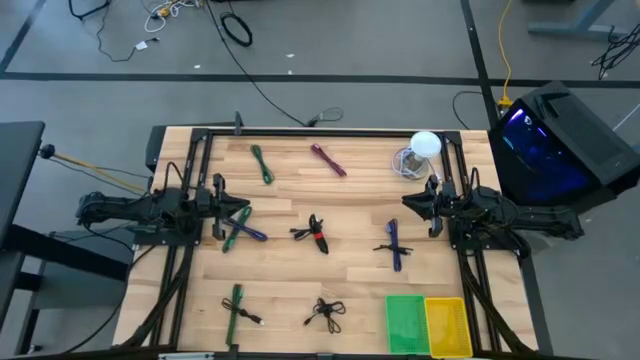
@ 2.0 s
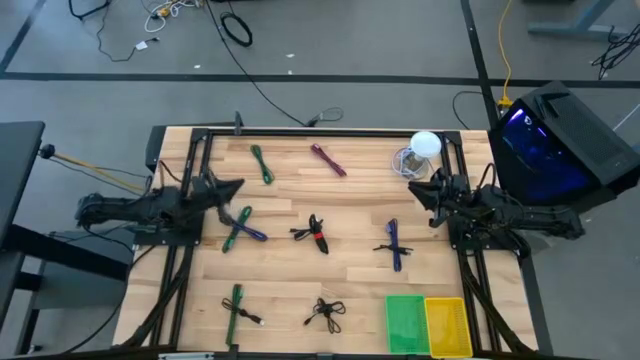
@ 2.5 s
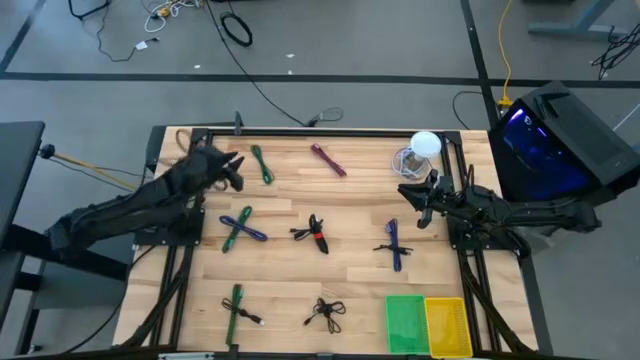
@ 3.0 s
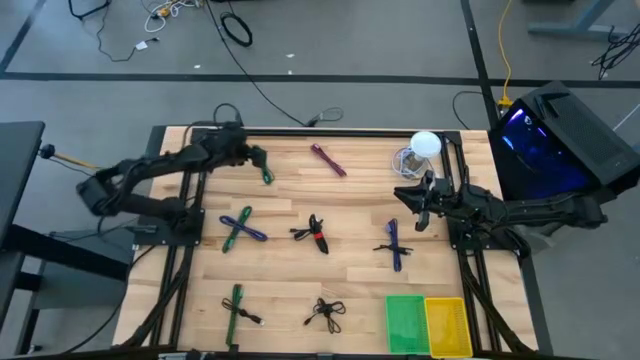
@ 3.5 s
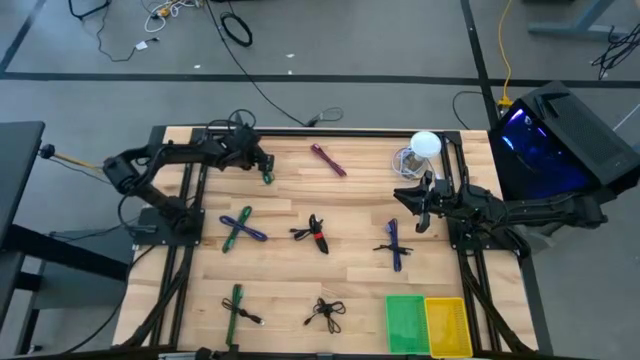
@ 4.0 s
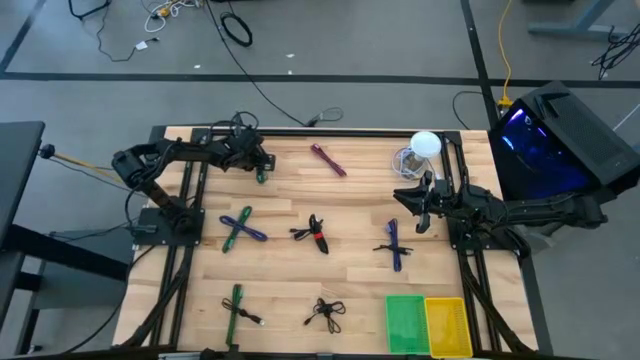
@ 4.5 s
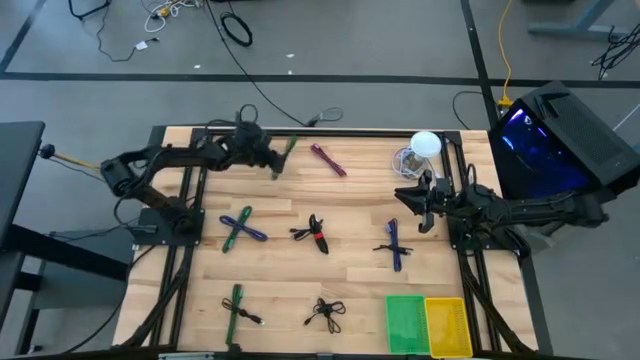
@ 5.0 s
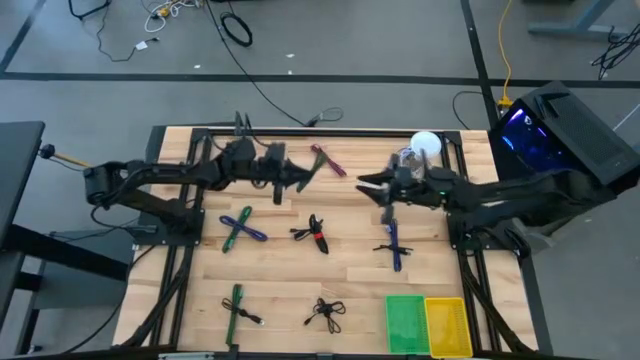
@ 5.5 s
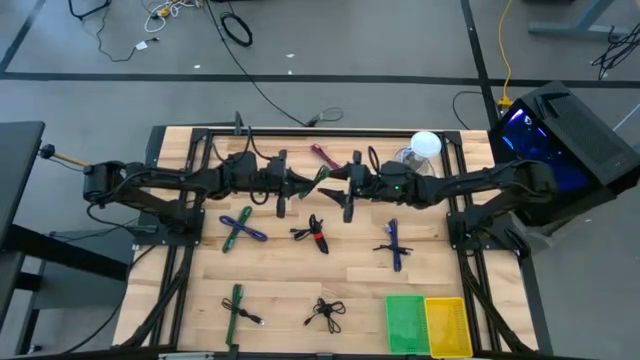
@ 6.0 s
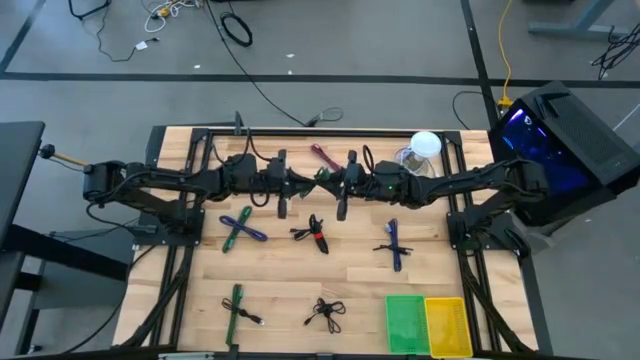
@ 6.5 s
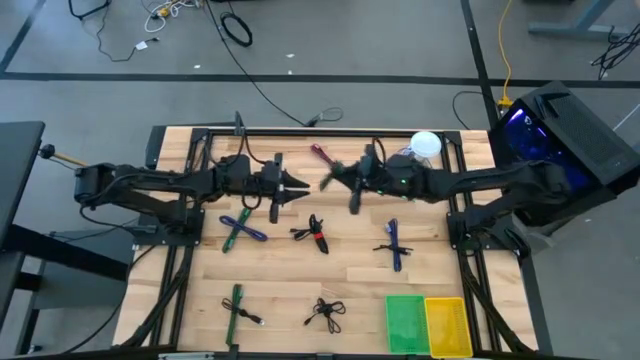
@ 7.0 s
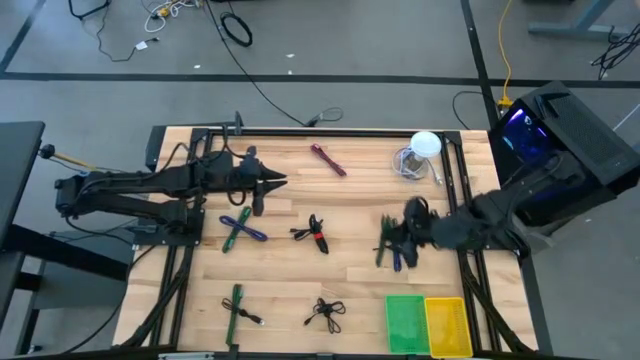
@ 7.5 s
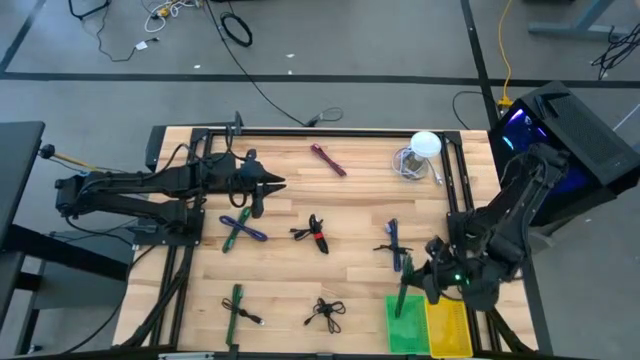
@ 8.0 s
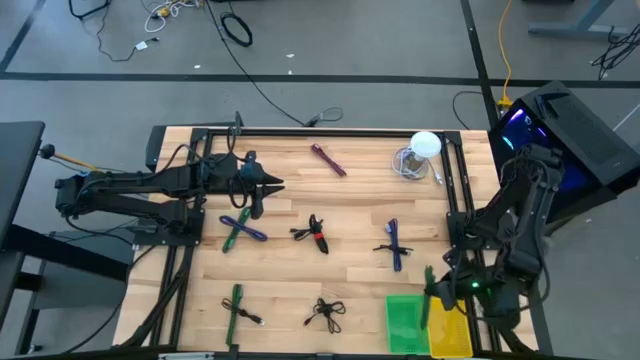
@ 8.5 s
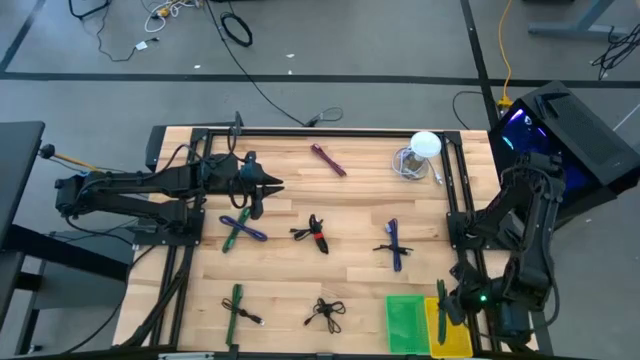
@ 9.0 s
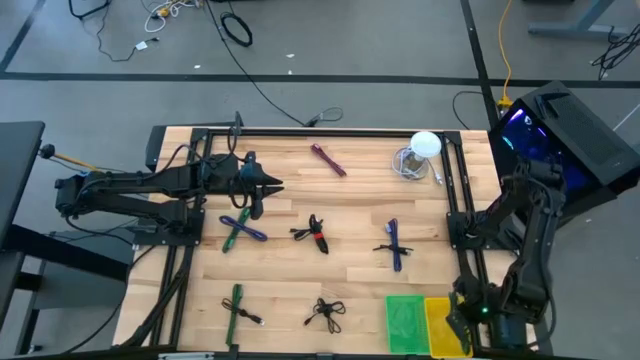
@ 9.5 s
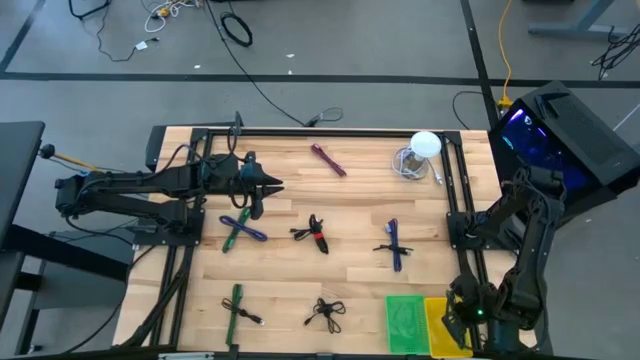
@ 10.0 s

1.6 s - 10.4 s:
Task: Pick & Place USB Port
Put the green and black charger cable into the yellow basket

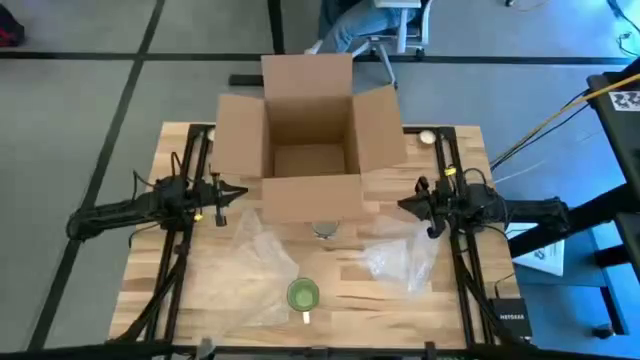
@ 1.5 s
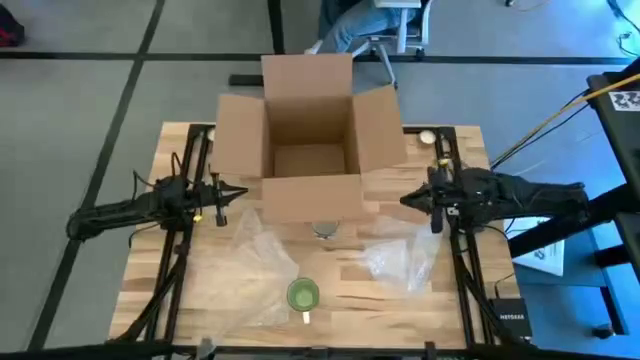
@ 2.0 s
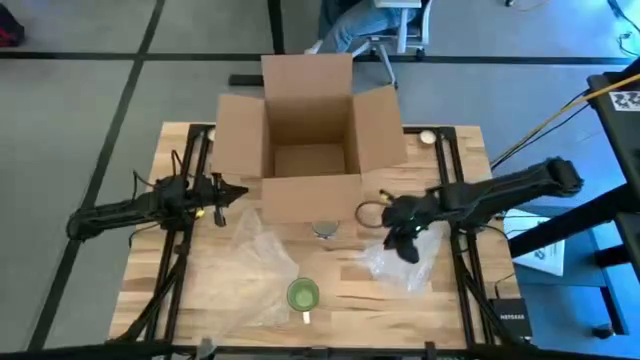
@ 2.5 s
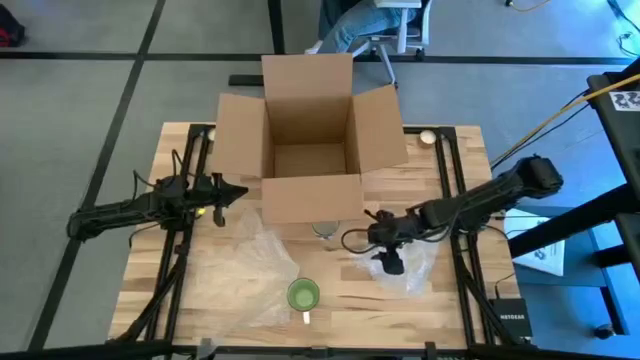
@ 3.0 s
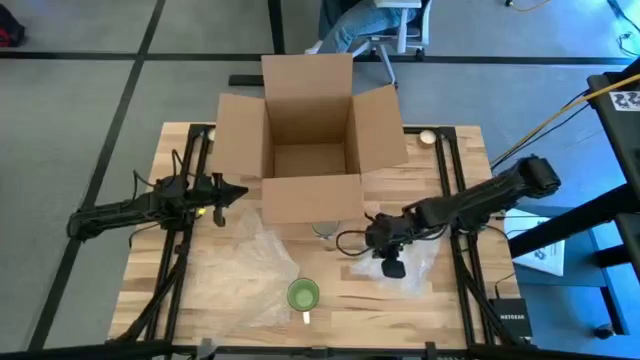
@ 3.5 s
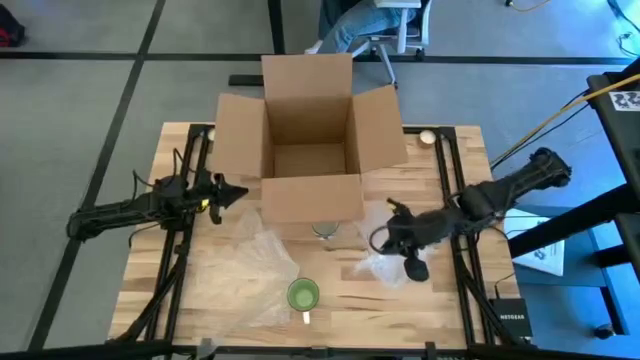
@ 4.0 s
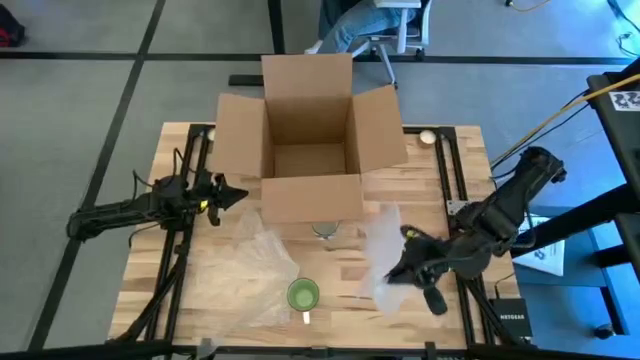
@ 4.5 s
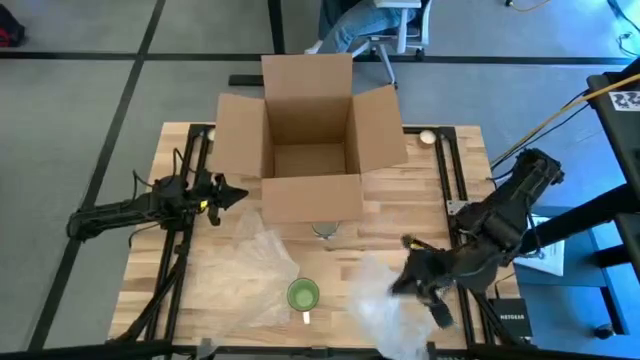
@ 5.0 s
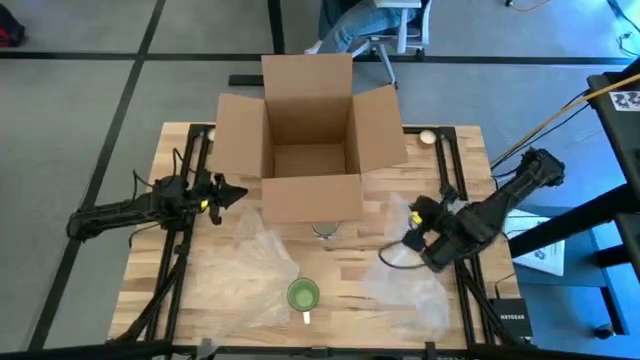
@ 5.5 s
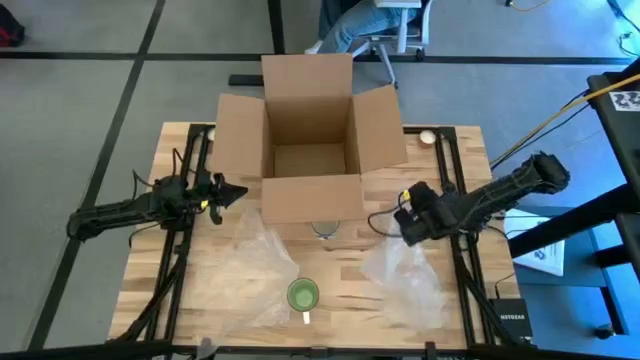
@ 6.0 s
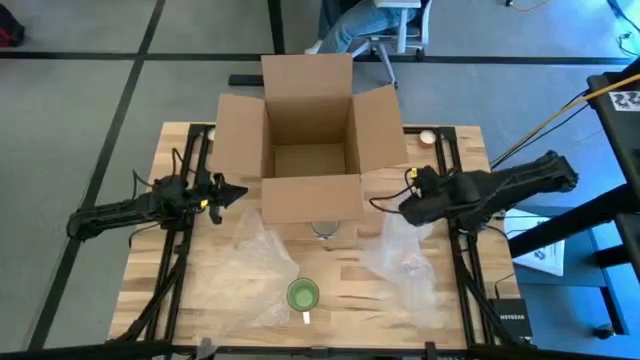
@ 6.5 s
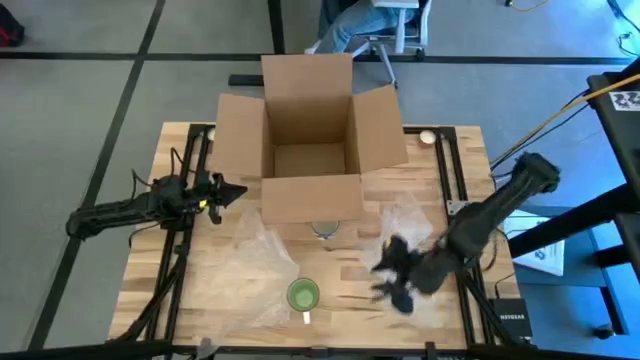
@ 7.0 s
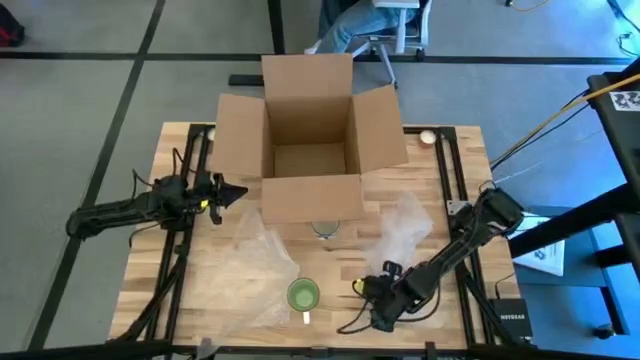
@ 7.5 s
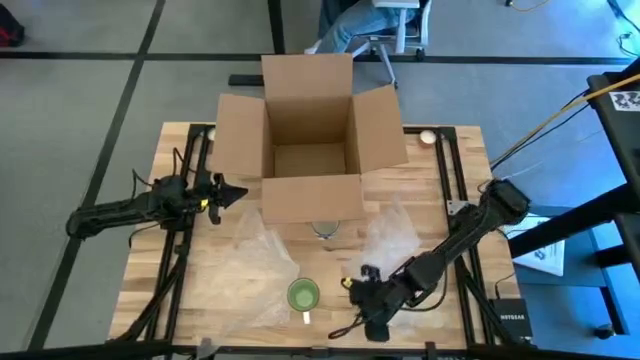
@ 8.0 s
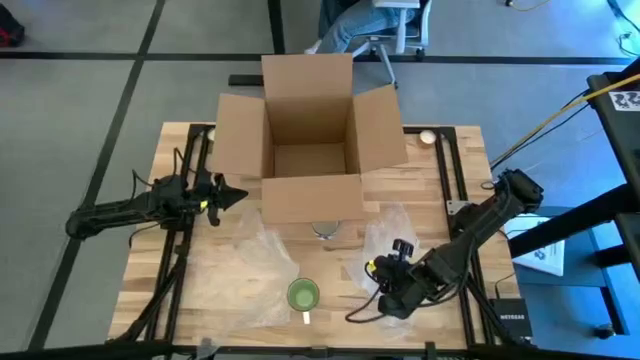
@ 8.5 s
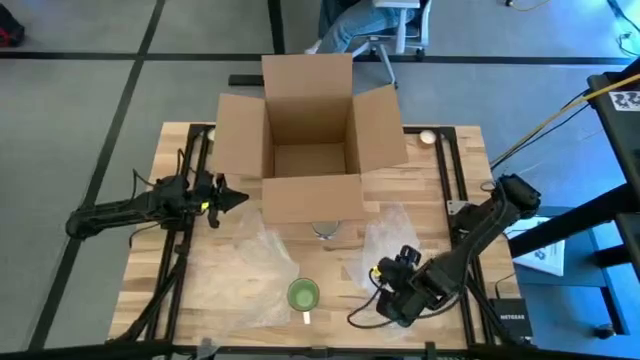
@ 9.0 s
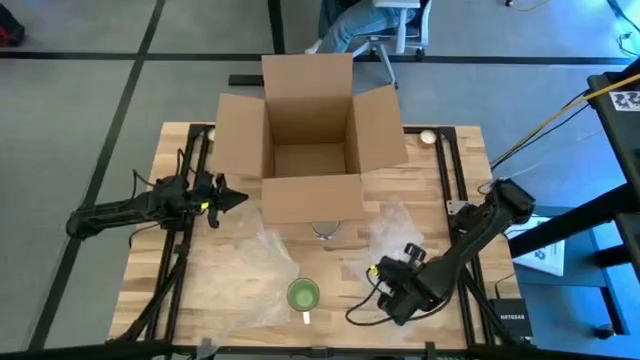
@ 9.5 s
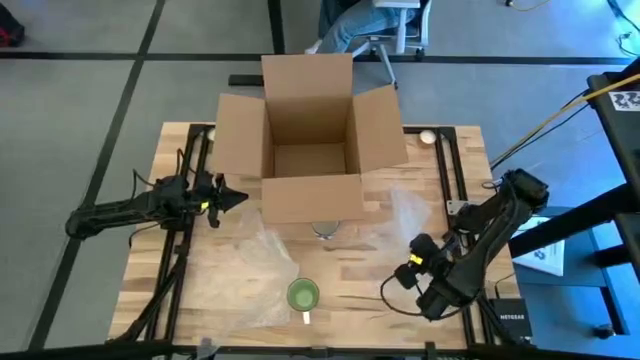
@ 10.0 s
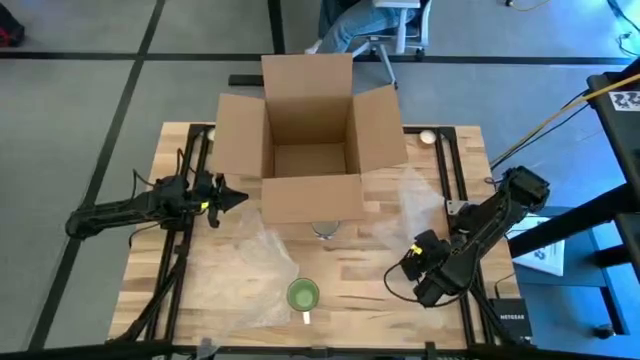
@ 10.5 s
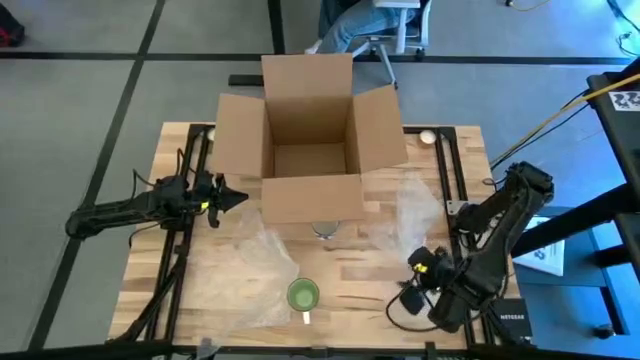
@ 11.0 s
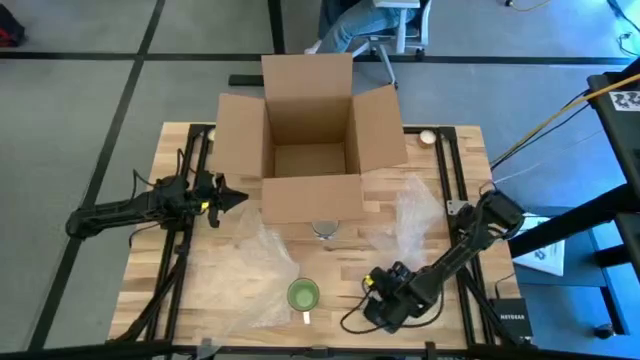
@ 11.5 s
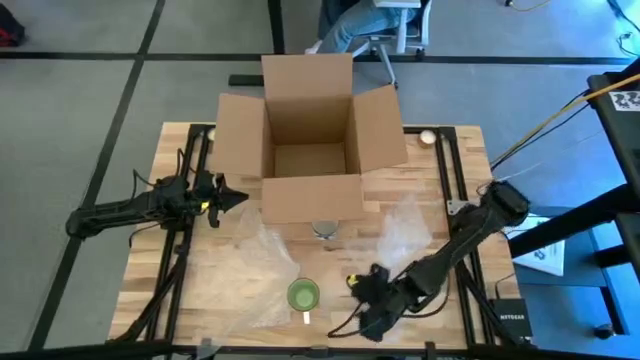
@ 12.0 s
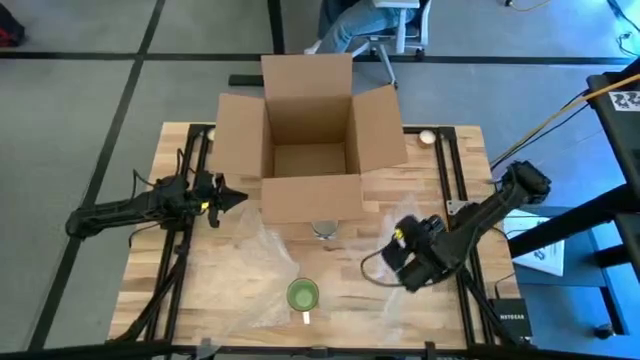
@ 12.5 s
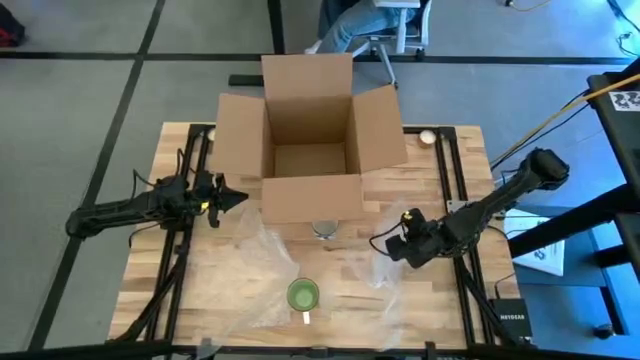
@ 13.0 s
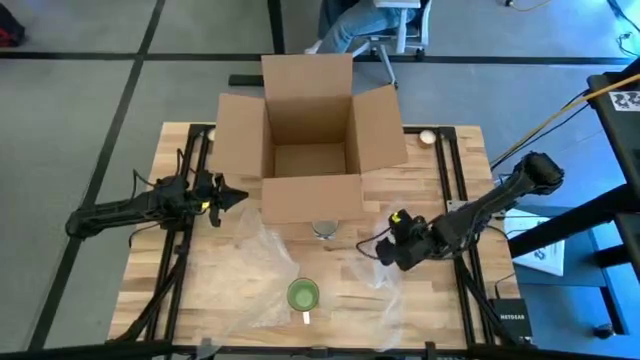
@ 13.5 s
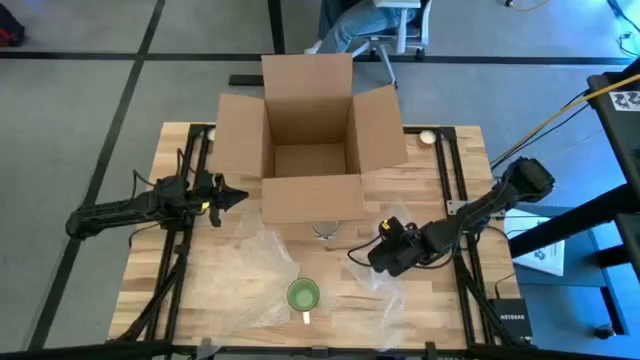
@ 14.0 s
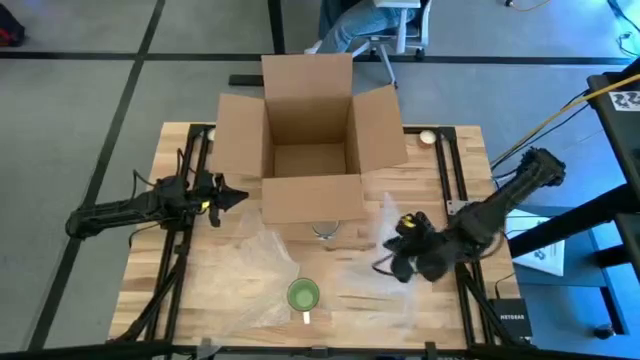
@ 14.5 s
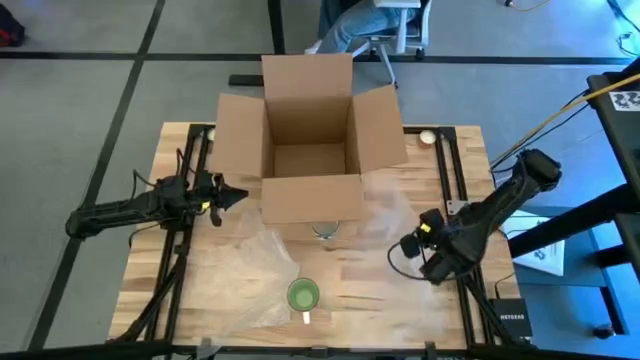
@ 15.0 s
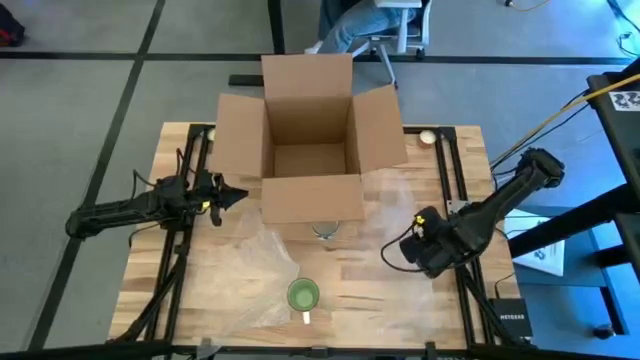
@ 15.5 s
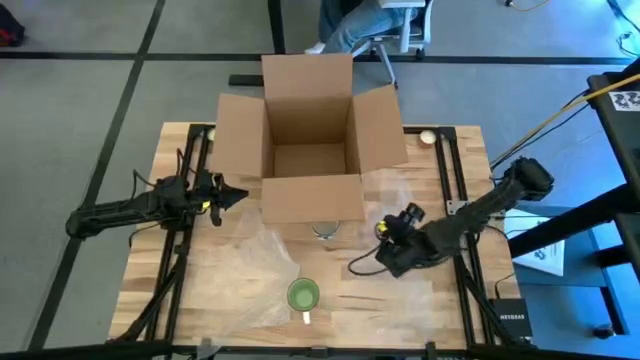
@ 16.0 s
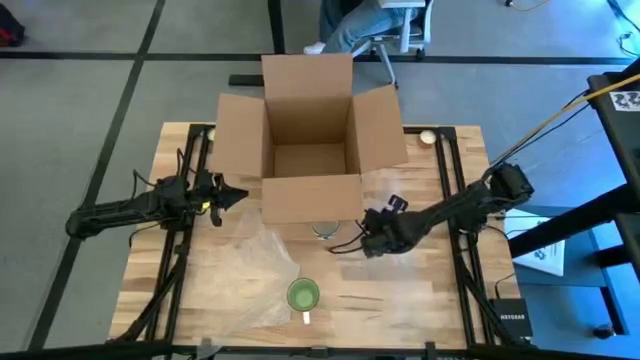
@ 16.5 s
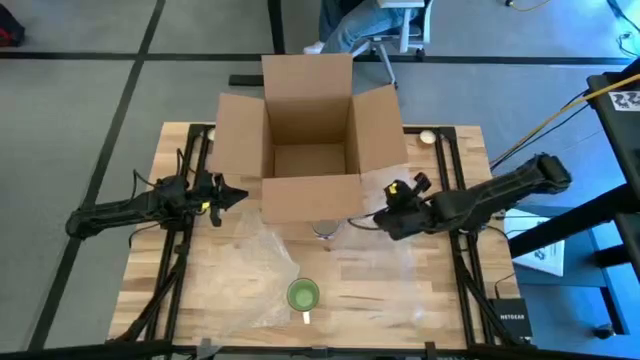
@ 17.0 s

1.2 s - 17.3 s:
Task: wrap mug
Prepare the right transparent bubble wrap
